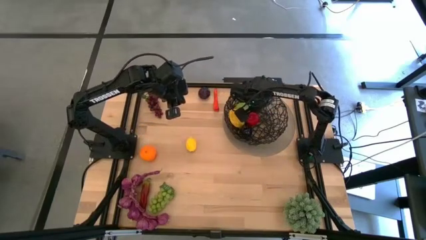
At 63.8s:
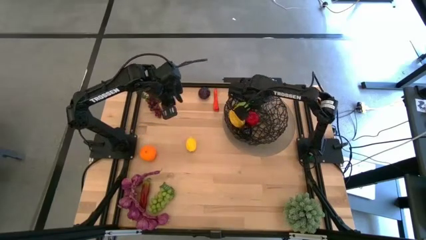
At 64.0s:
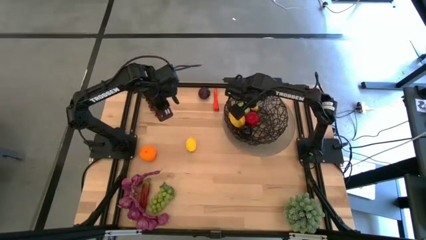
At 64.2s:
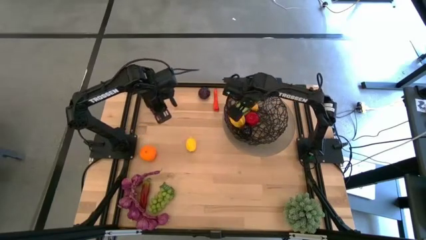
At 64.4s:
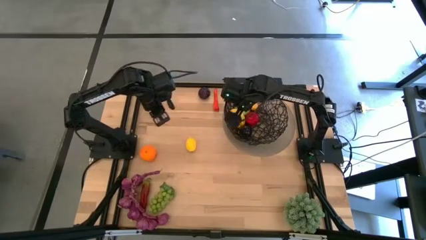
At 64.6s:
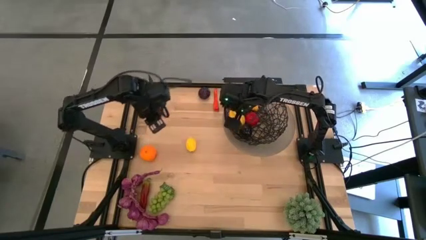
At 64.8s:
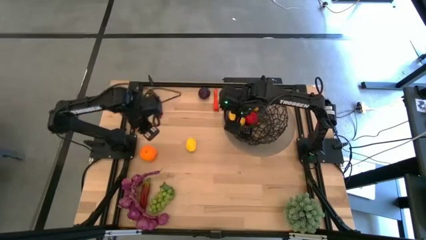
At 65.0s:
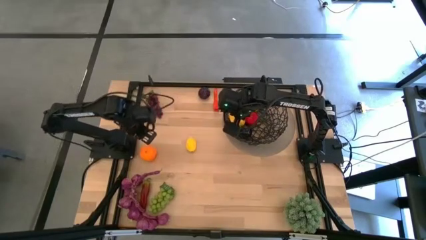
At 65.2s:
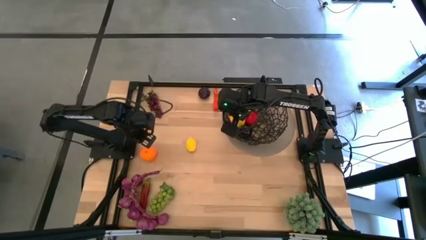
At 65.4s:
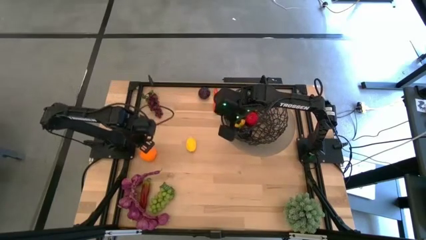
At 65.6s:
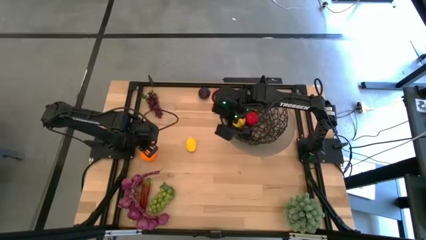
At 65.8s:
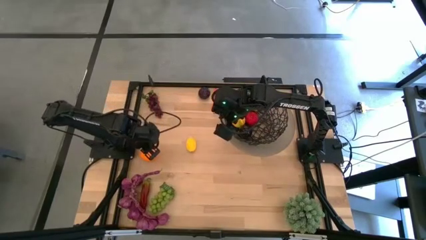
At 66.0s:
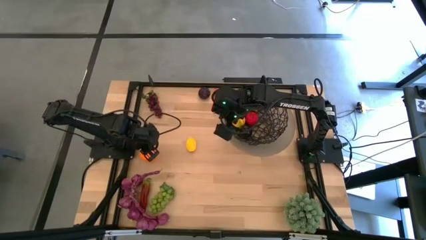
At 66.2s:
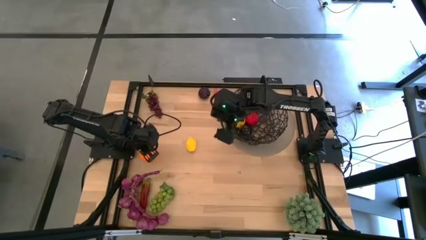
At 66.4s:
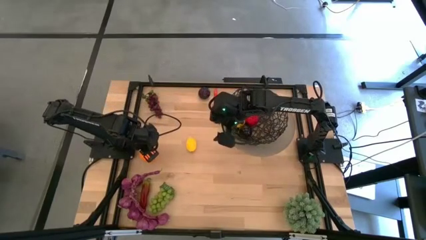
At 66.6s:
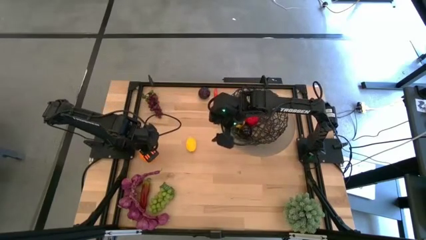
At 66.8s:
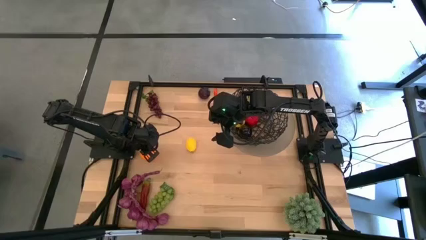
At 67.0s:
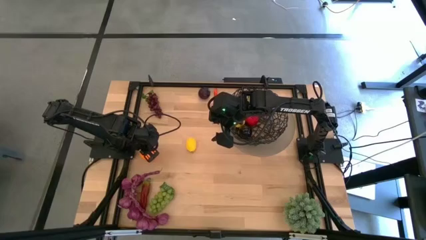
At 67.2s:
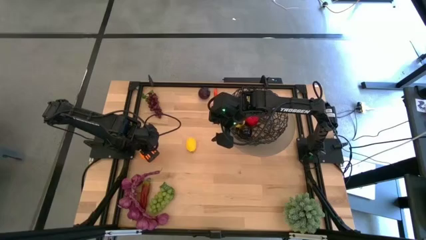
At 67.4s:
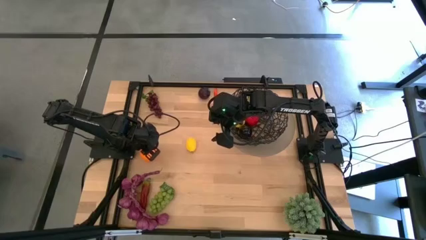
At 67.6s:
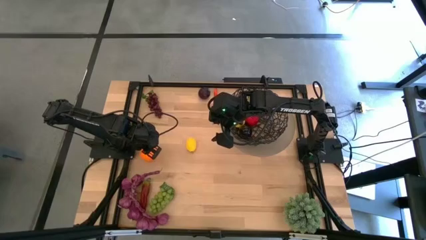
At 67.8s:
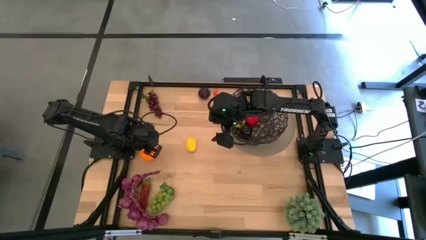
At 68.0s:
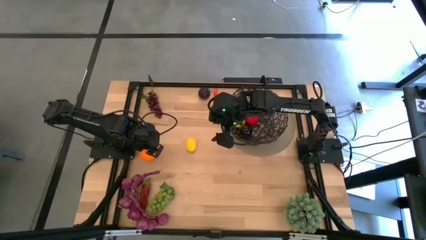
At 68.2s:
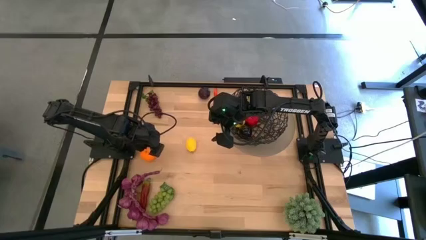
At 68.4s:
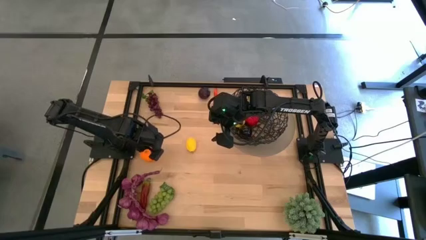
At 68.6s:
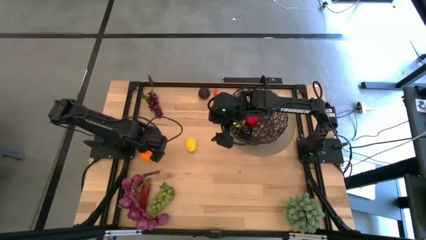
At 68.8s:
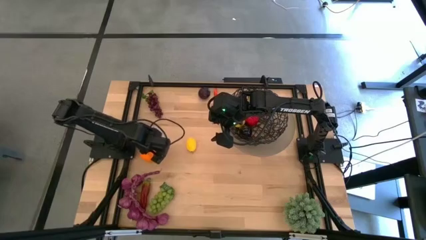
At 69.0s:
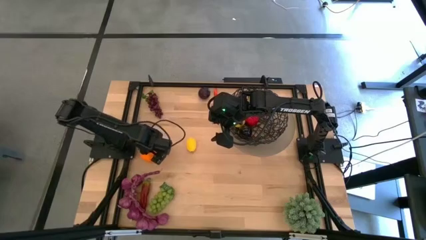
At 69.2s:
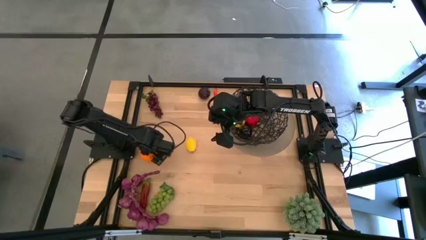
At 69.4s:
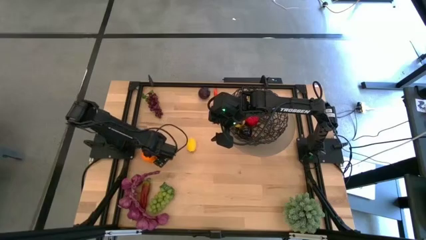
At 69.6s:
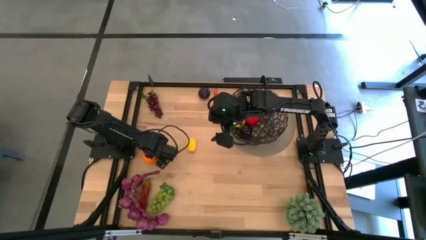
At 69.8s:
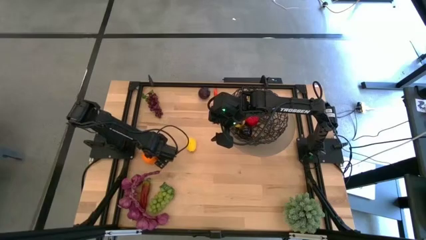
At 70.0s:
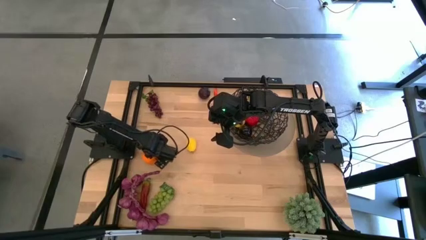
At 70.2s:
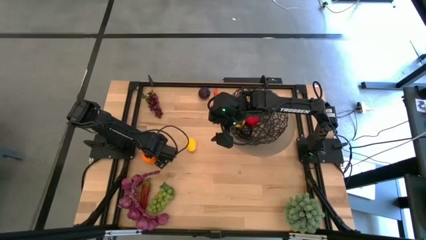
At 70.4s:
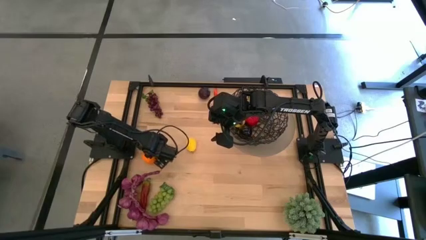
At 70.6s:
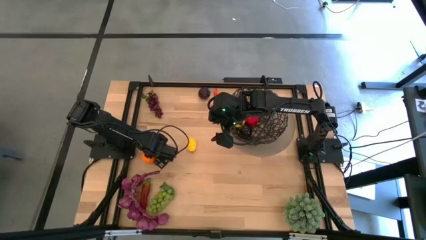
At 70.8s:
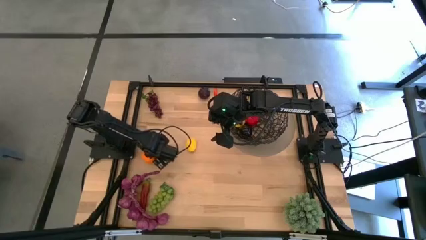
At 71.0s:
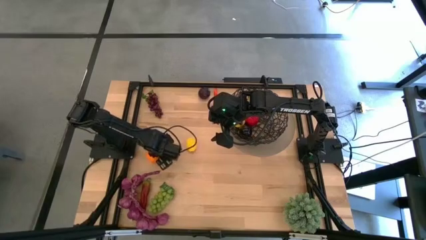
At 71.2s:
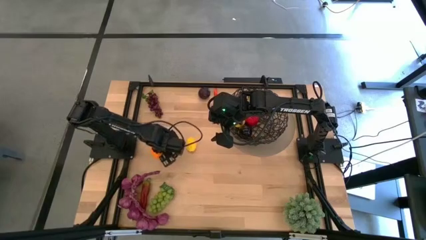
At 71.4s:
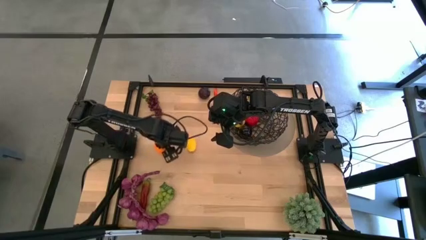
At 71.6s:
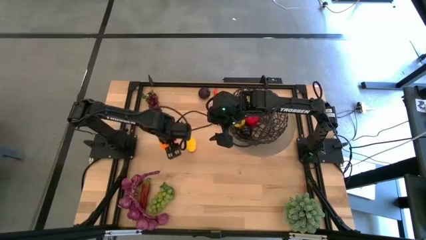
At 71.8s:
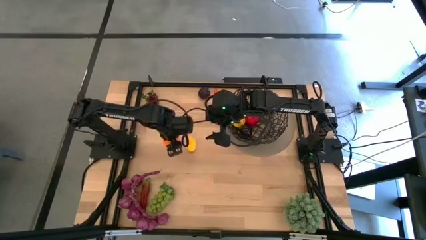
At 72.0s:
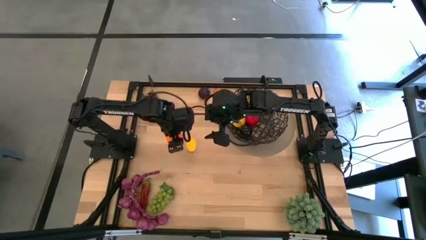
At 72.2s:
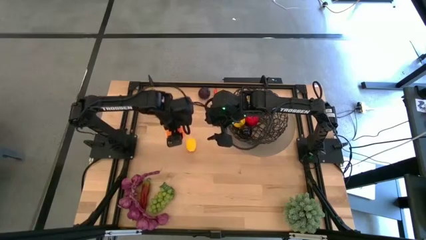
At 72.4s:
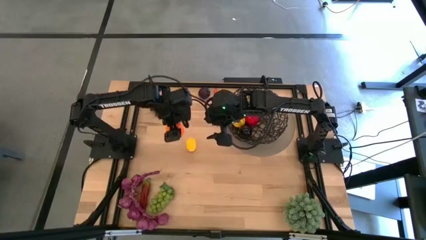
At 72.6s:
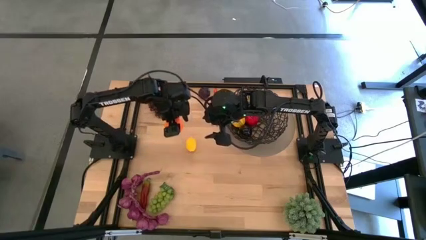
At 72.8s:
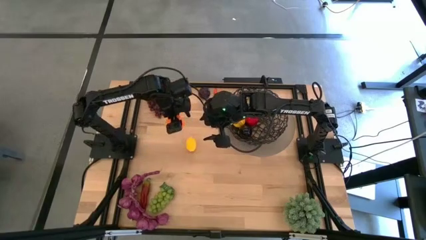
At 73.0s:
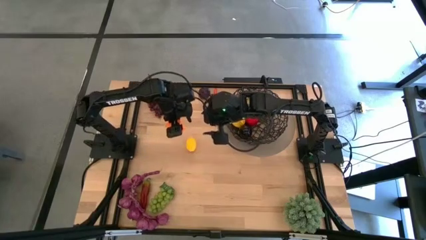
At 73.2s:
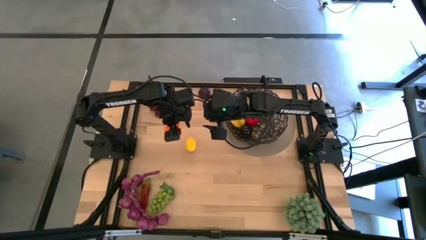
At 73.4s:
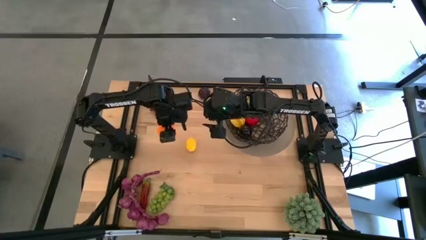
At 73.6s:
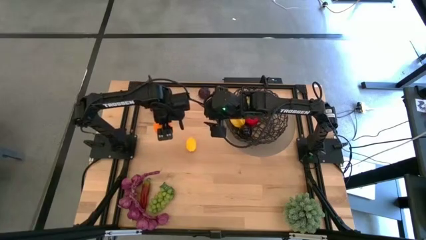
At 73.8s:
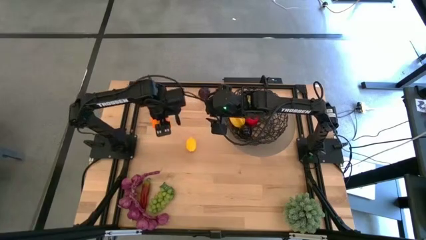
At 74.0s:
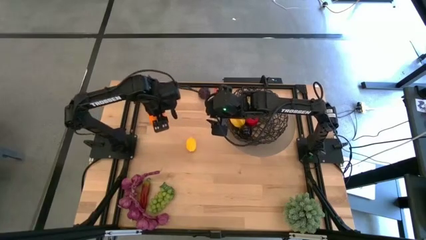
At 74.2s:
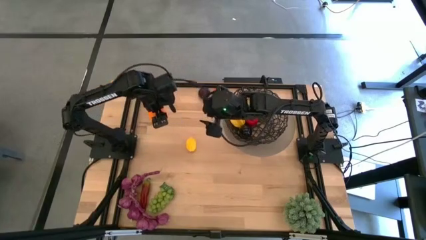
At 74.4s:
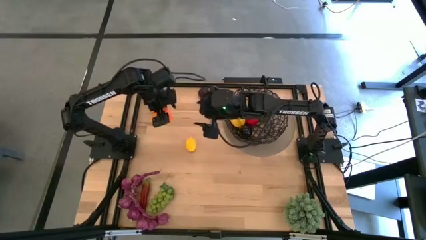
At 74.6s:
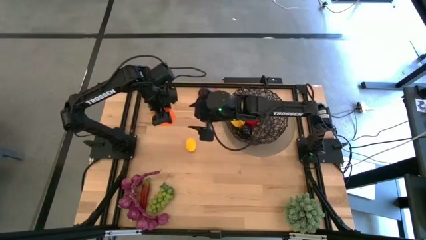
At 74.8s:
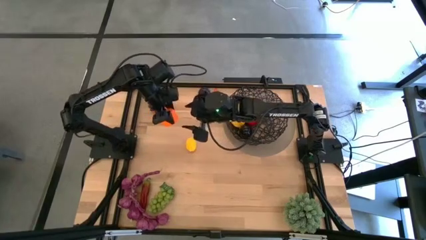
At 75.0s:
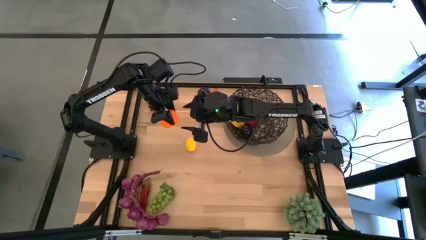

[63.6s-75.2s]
Task: Build produce basket
Put the orange into the black wire basket

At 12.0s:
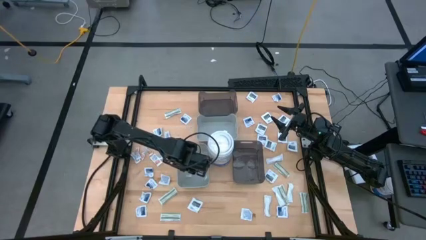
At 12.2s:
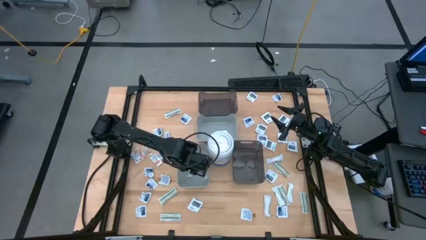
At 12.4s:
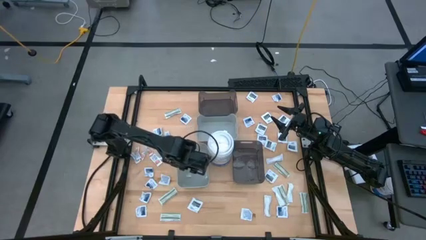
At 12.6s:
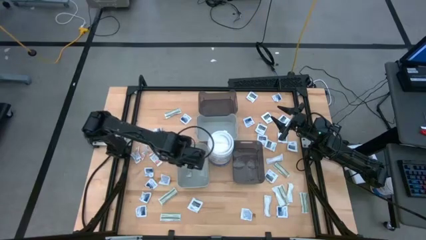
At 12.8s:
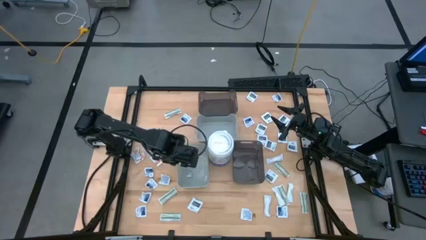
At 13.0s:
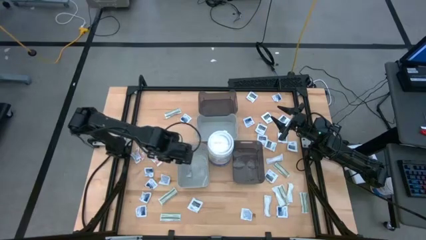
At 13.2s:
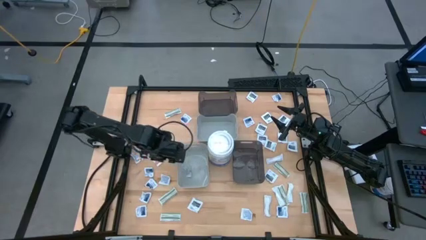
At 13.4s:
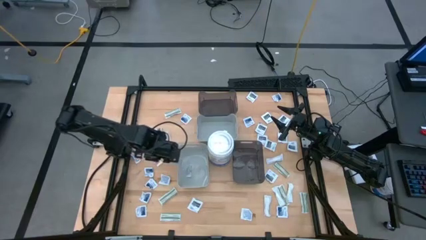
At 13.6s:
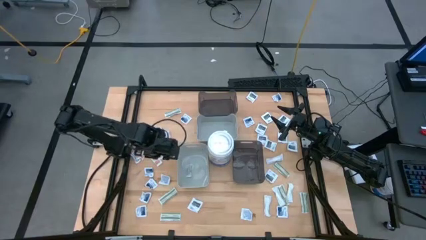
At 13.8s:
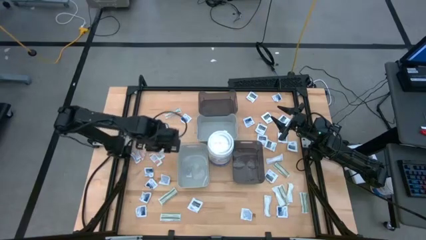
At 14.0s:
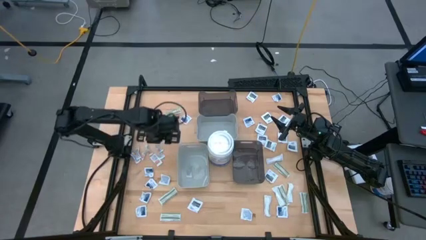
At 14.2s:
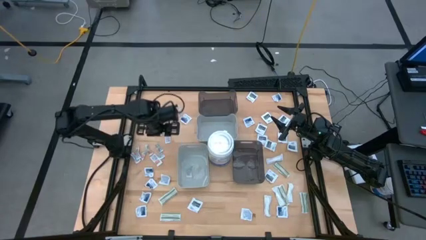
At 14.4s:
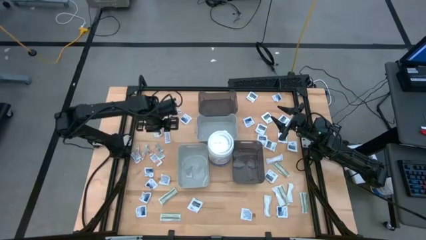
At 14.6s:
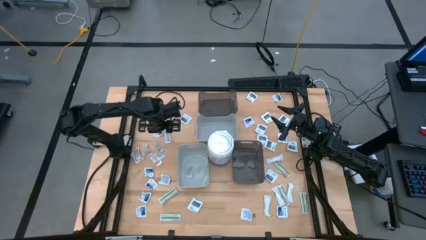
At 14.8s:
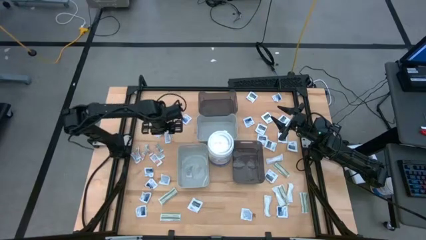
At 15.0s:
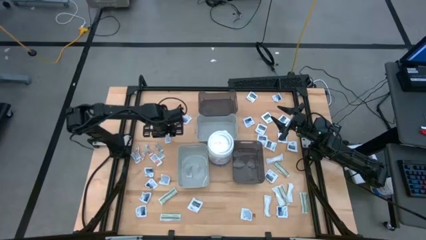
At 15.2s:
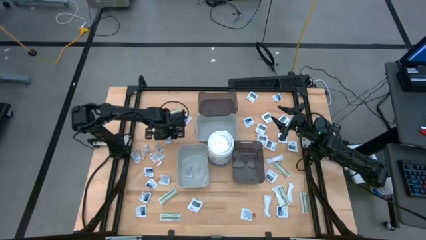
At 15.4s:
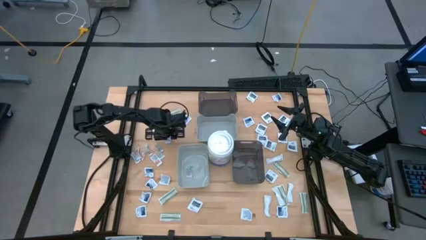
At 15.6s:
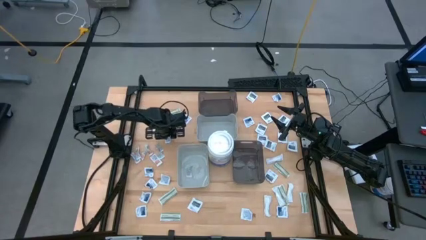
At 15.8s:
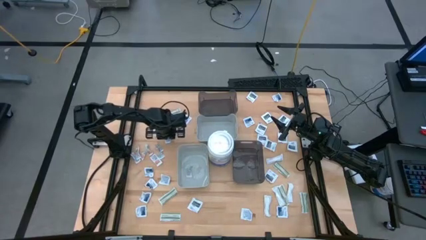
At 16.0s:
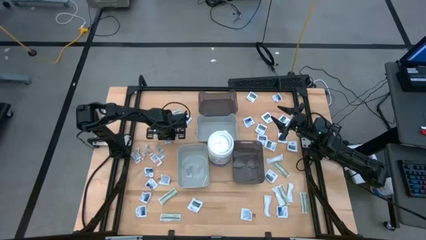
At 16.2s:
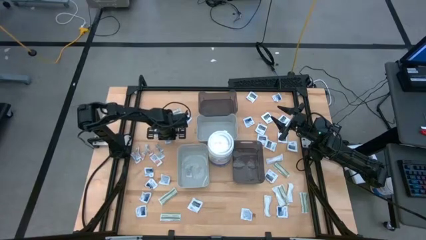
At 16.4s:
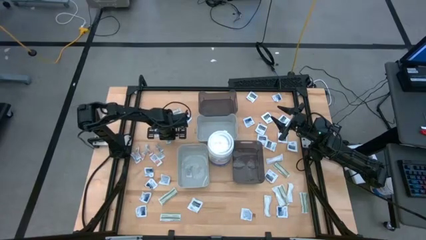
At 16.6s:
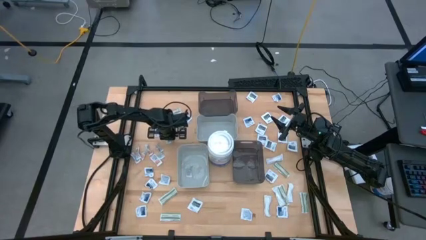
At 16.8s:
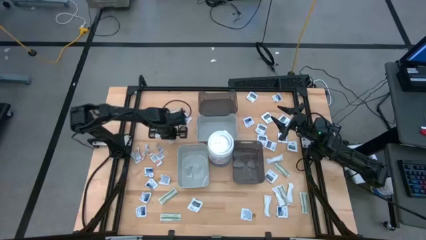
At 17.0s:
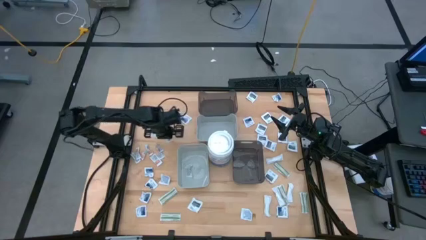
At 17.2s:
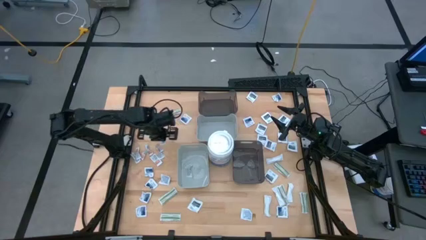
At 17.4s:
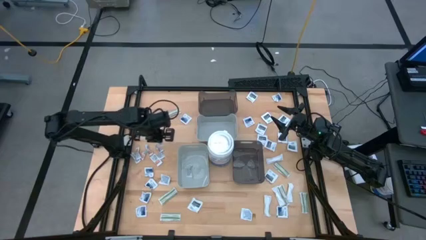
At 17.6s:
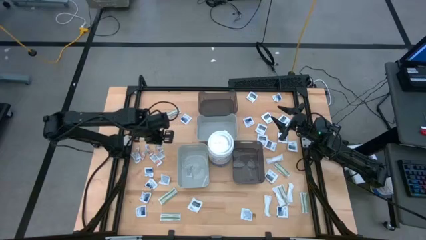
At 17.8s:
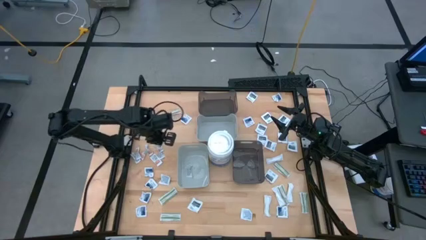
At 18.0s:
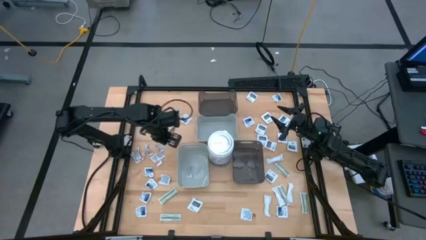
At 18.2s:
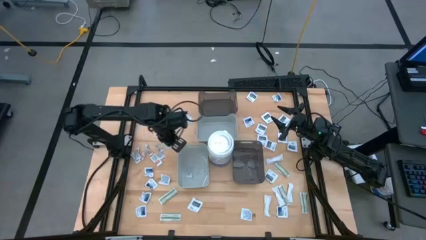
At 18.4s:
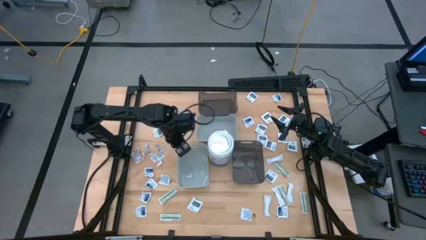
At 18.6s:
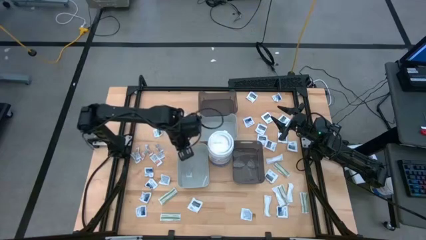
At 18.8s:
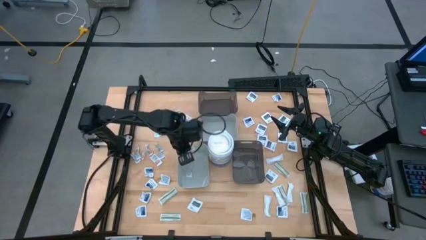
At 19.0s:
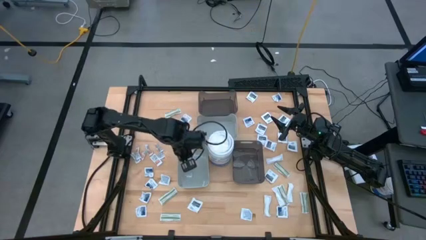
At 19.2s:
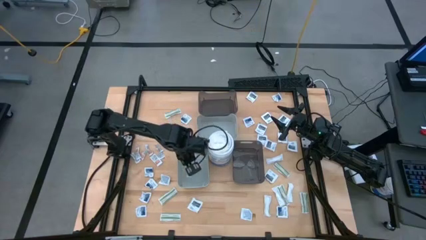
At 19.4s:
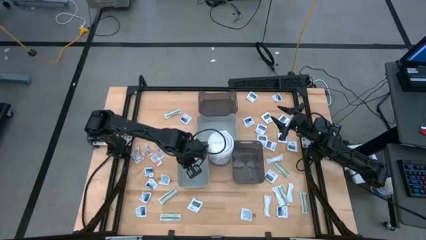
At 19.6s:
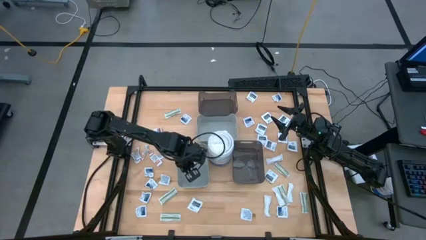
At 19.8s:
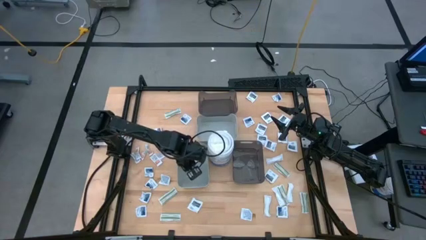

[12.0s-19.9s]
Task: Pick & Place First Aid Supplies
Put the ointment pack into the bottom gray bin
